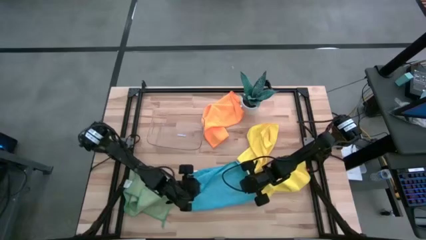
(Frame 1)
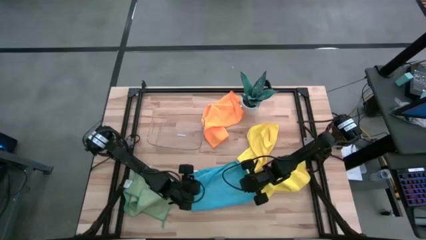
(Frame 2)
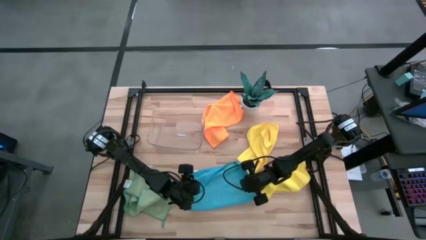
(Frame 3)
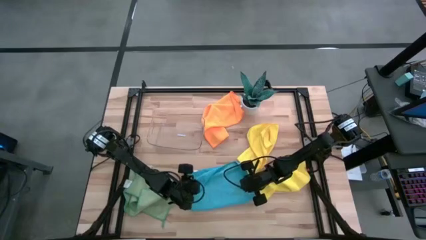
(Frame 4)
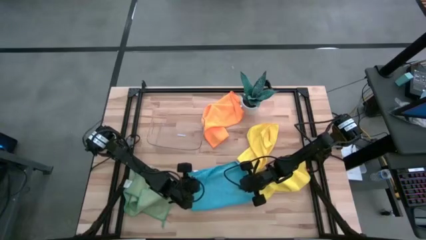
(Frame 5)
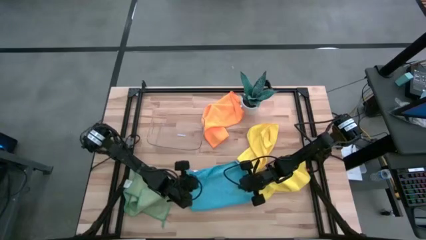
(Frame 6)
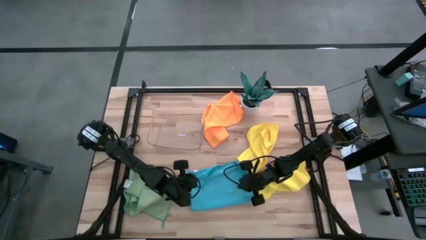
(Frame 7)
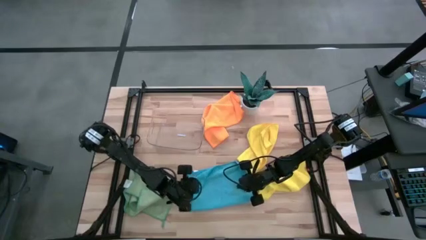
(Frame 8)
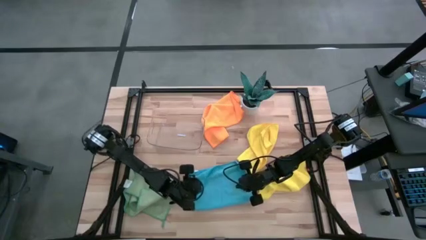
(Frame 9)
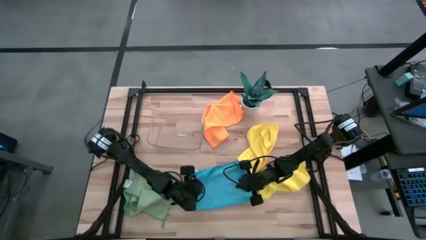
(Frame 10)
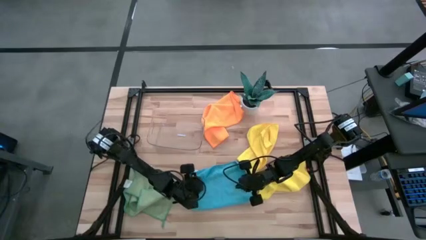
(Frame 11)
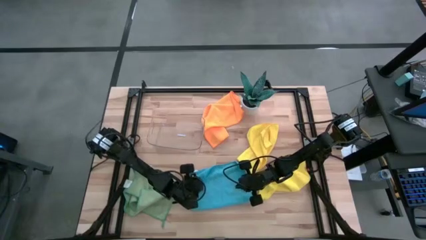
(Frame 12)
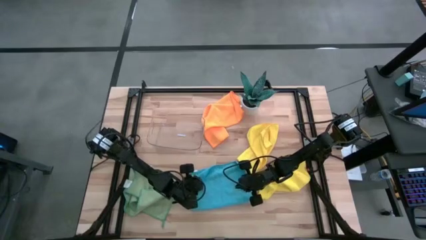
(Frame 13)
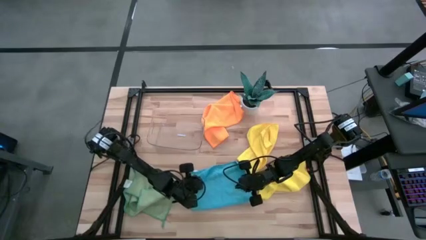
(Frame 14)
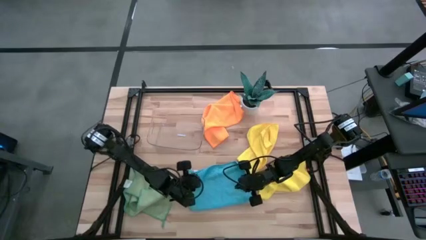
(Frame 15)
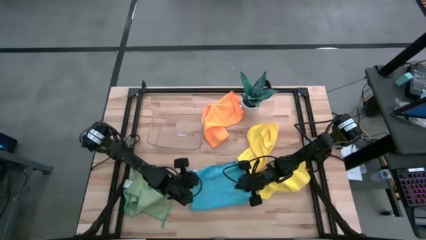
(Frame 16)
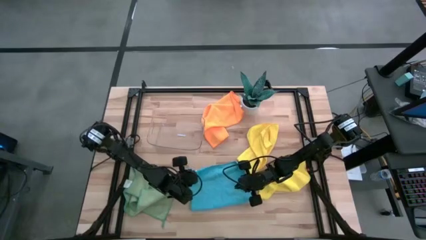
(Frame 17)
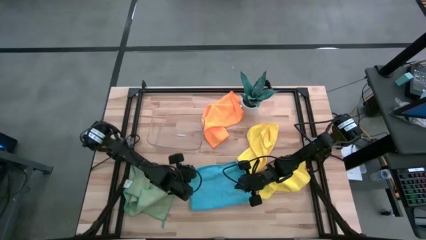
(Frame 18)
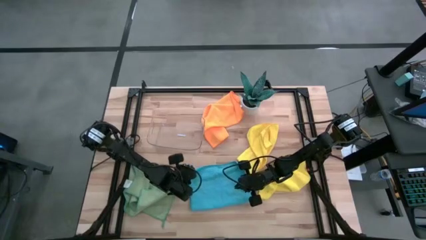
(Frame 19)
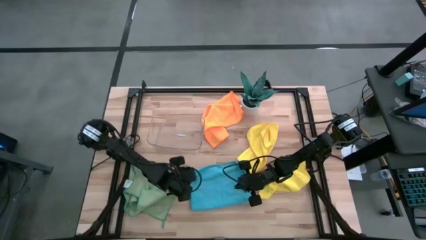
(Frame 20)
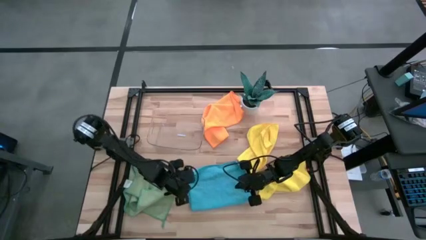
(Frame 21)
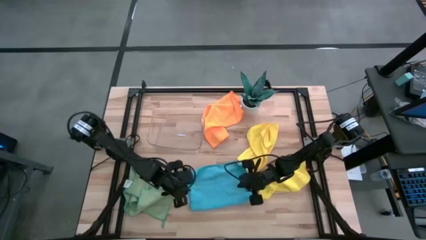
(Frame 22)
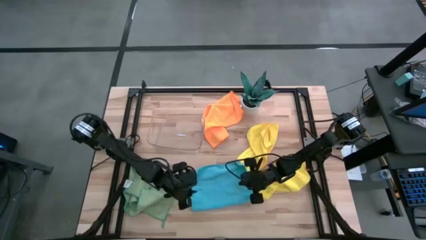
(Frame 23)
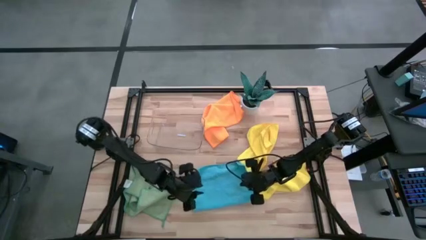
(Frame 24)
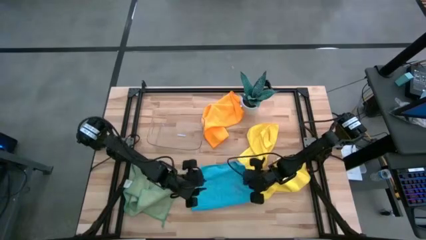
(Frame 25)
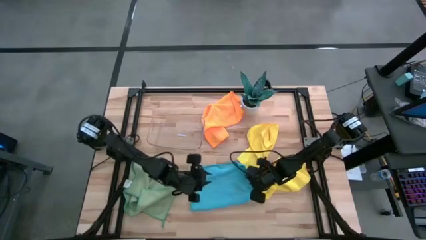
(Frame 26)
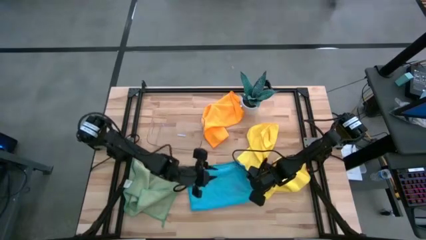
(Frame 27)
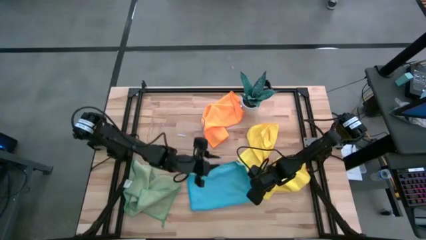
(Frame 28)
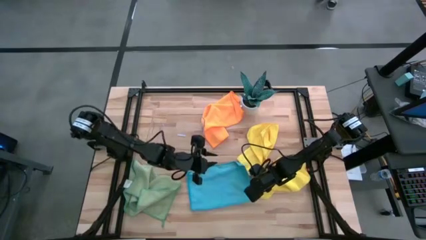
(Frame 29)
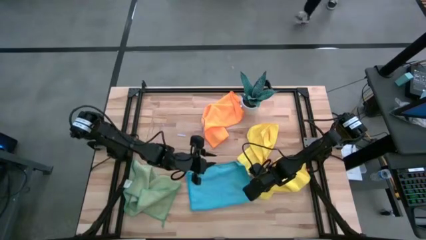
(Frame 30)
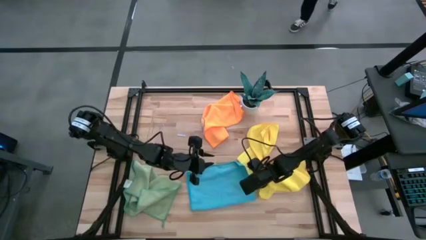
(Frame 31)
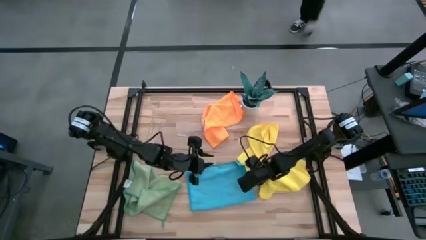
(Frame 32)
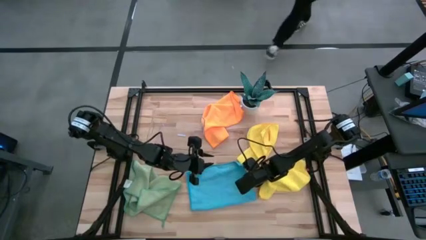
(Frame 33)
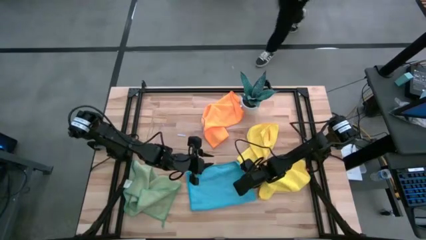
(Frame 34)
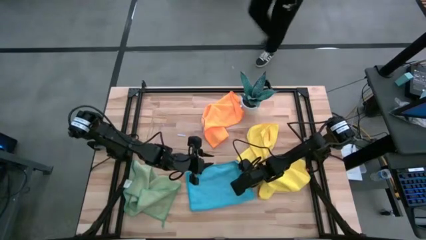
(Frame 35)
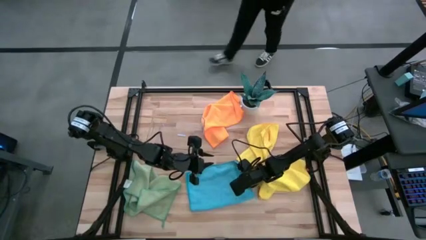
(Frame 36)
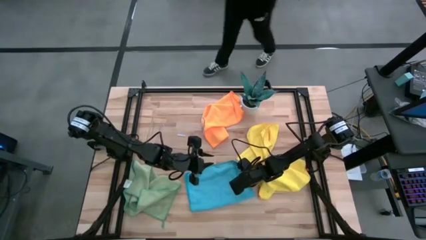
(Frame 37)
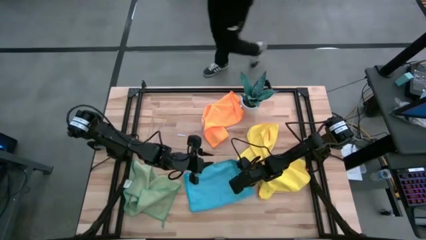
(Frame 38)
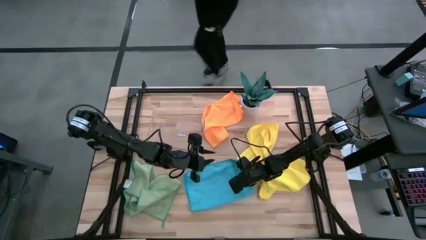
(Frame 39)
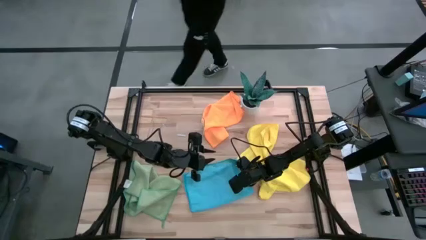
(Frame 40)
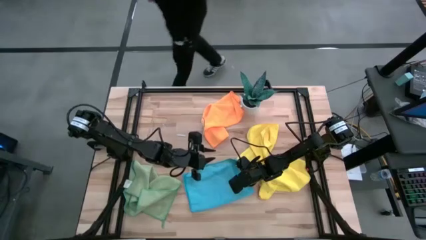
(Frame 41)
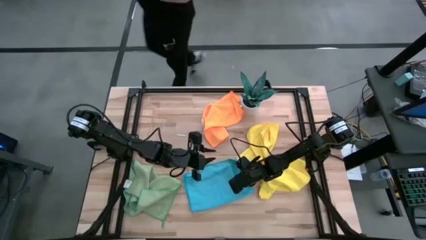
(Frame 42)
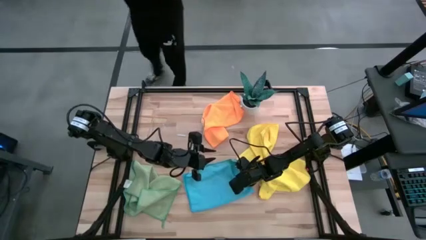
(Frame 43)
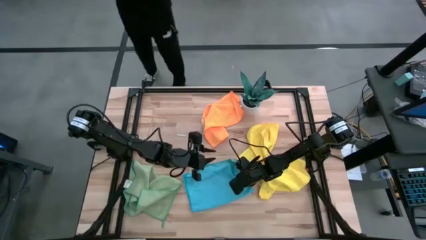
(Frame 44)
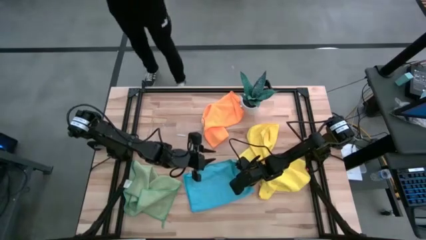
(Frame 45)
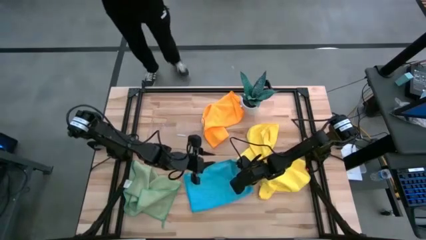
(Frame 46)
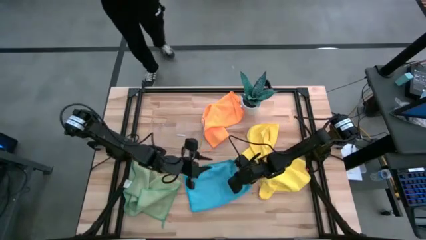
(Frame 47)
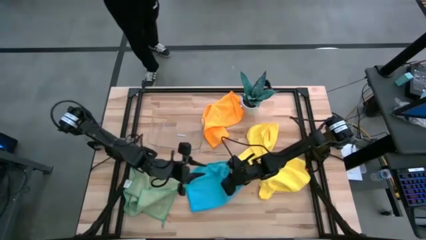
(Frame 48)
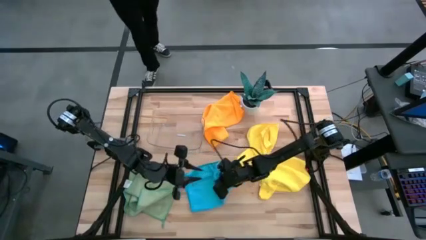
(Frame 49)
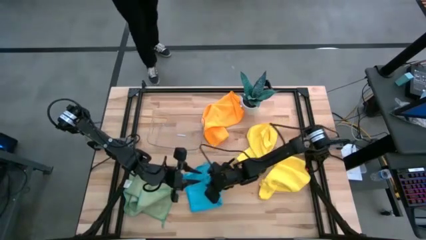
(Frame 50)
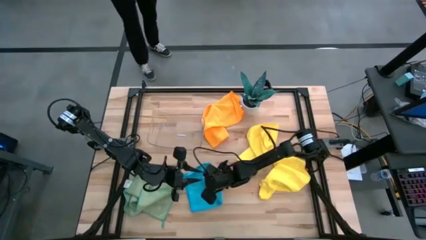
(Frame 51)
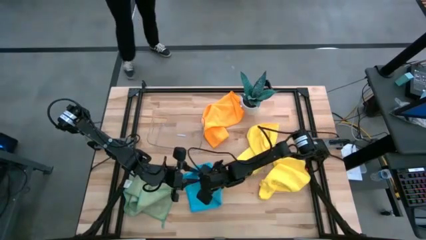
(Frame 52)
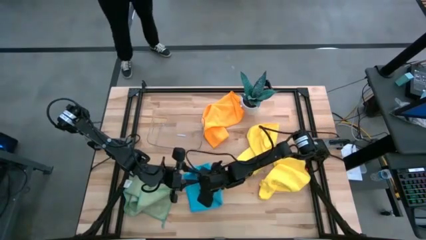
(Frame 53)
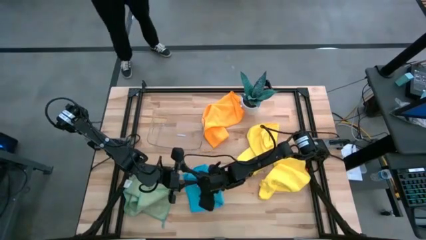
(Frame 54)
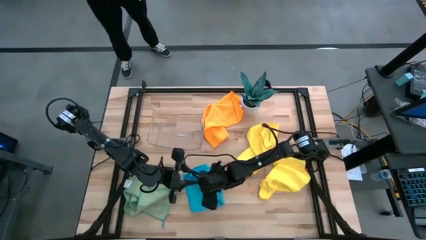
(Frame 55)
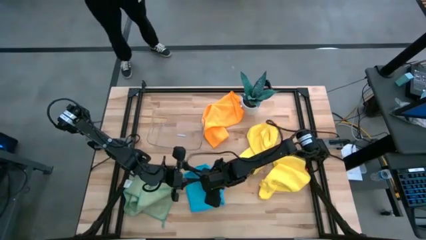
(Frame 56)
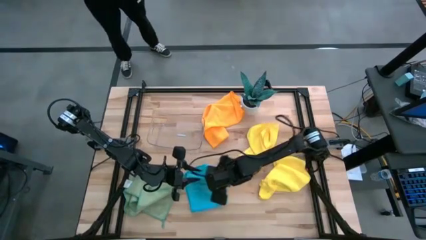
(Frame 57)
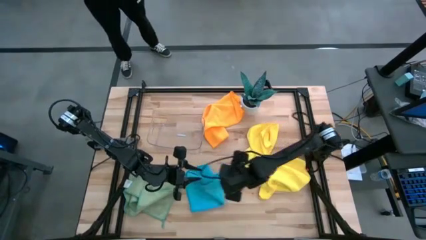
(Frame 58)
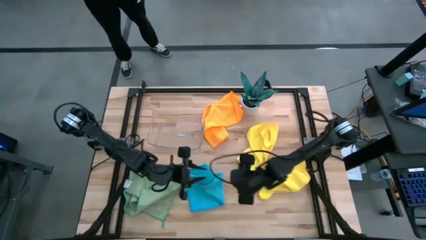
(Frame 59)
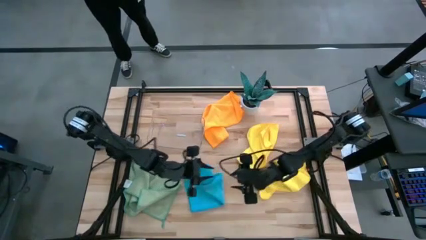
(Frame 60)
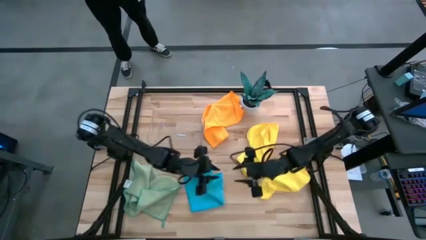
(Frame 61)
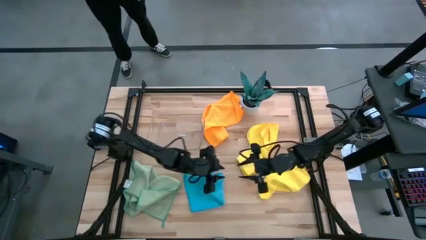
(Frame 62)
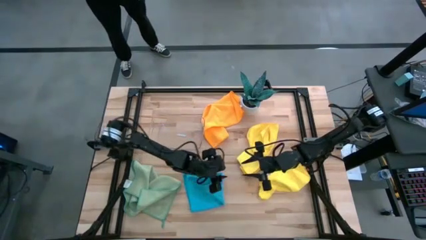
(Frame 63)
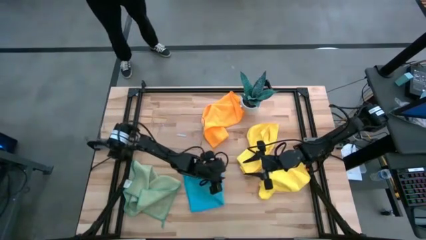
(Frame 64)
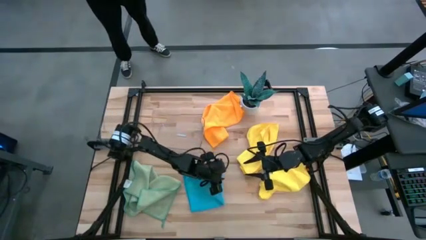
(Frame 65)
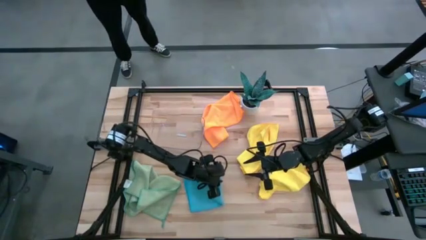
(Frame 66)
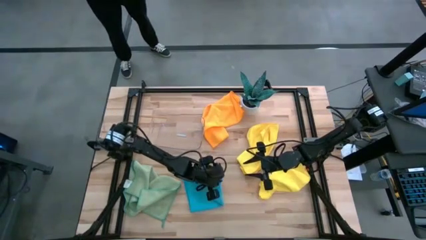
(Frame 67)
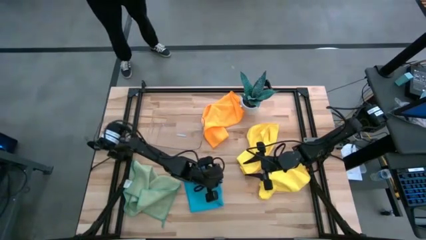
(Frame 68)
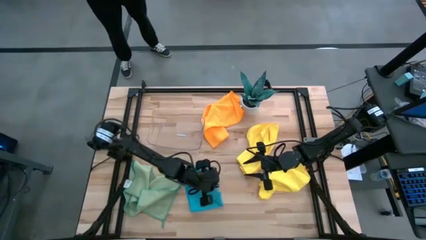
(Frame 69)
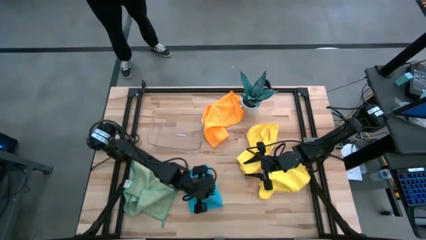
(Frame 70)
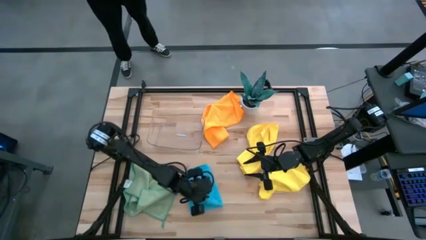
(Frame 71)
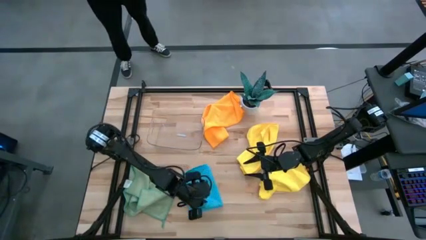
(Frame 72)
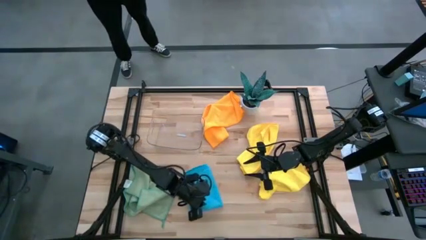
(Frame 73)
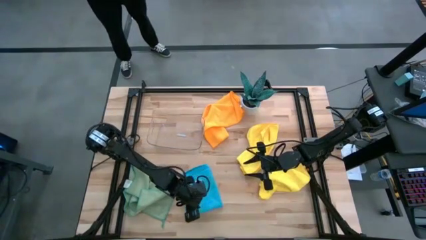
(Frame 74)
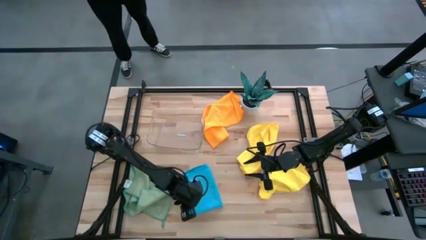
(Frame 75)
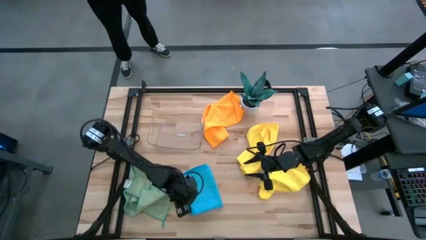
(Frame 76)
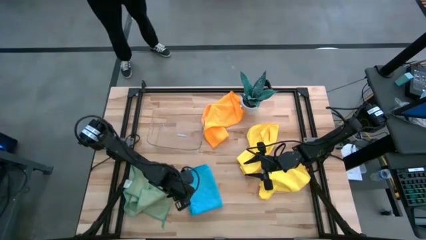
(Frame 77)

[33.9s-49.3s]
Task: Fold microfiber towels
Fold the blue microfiber cloth
